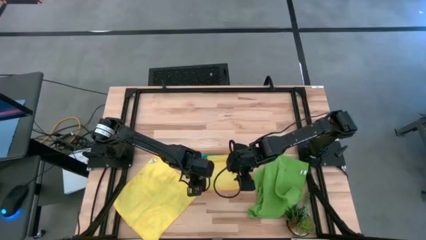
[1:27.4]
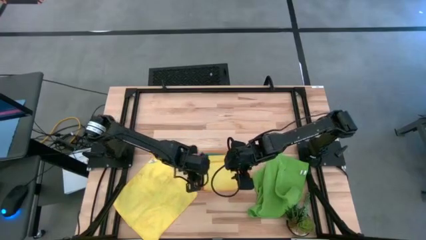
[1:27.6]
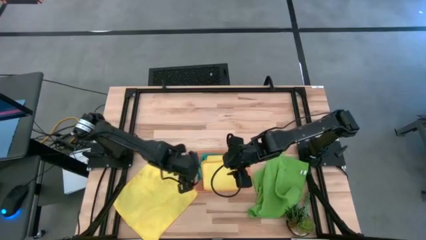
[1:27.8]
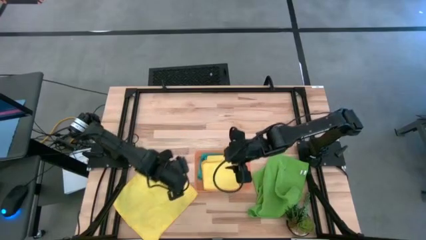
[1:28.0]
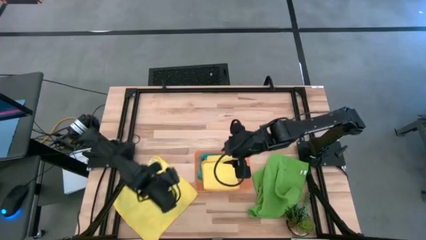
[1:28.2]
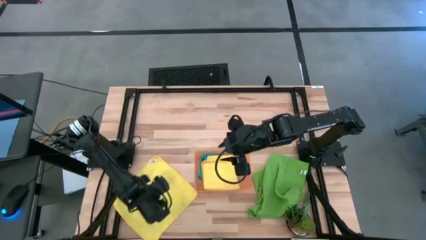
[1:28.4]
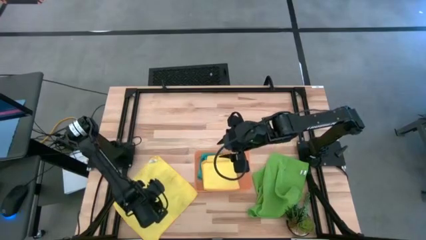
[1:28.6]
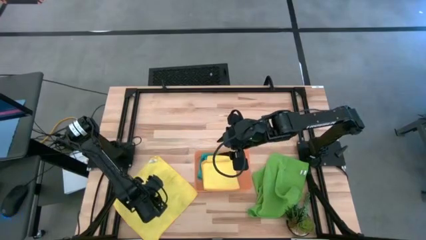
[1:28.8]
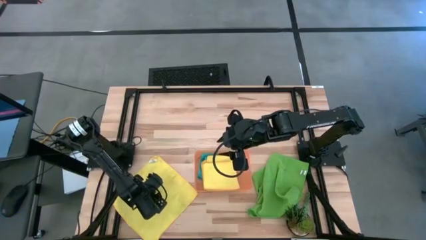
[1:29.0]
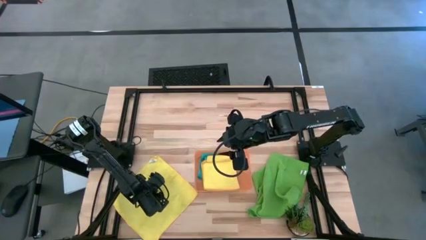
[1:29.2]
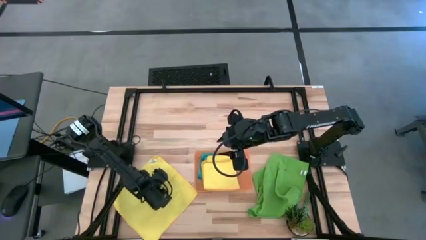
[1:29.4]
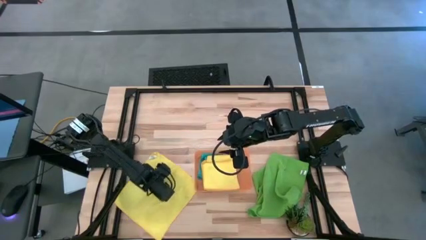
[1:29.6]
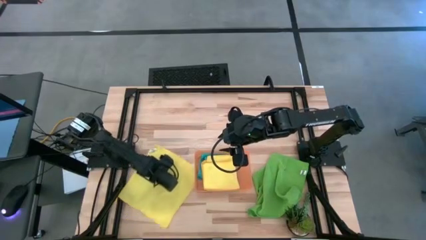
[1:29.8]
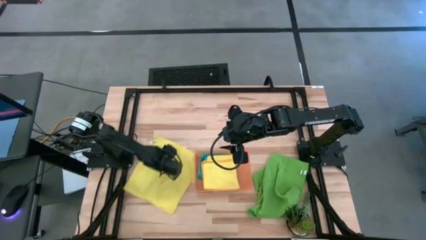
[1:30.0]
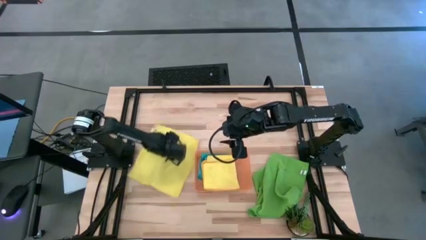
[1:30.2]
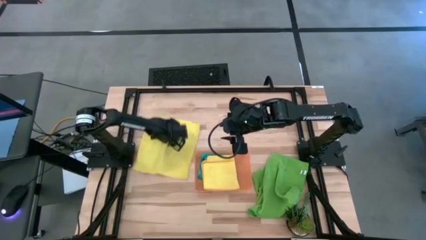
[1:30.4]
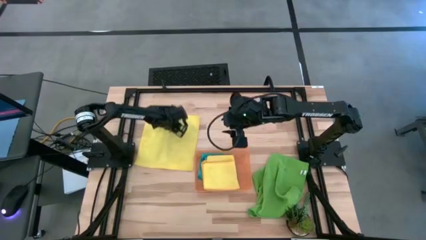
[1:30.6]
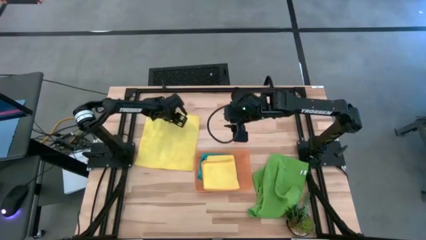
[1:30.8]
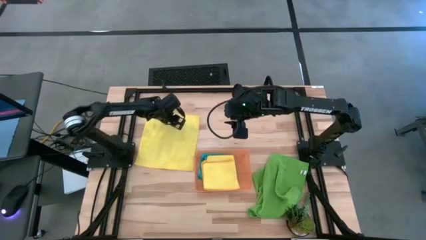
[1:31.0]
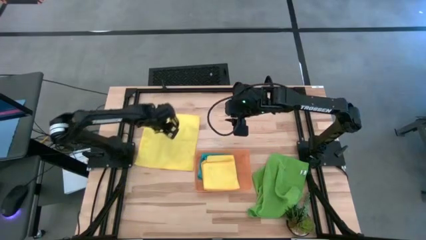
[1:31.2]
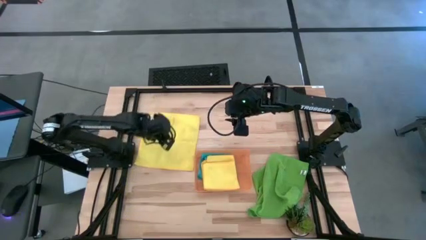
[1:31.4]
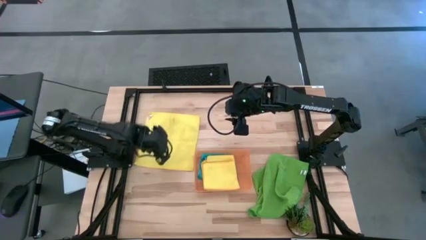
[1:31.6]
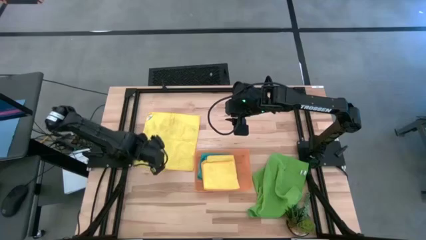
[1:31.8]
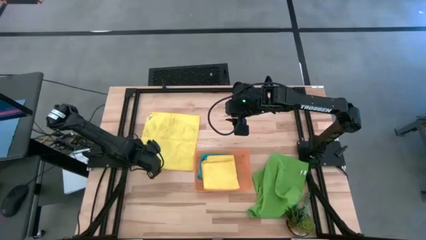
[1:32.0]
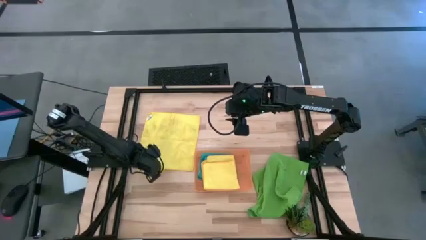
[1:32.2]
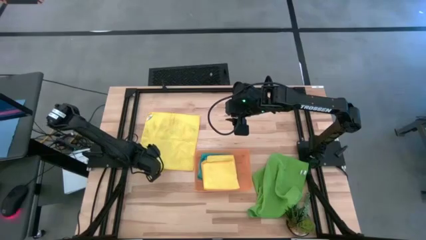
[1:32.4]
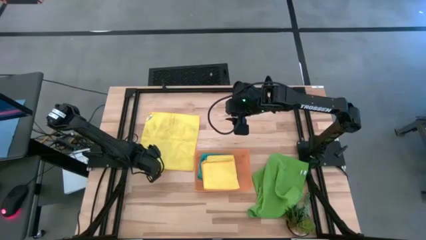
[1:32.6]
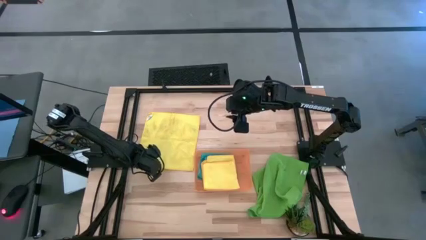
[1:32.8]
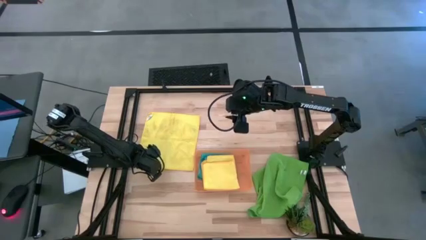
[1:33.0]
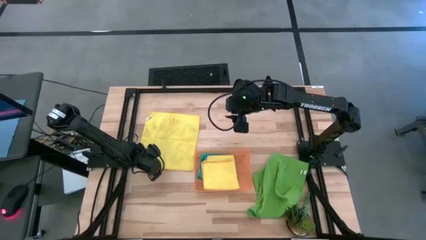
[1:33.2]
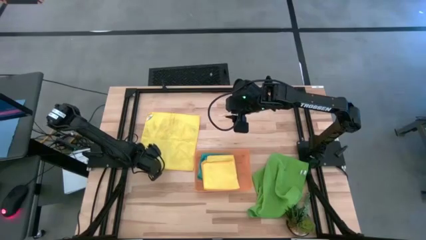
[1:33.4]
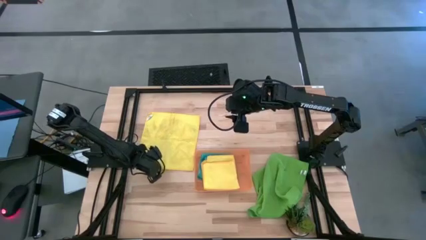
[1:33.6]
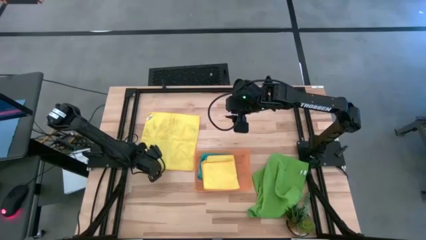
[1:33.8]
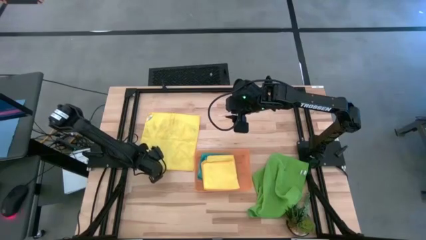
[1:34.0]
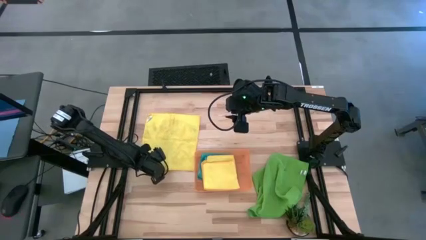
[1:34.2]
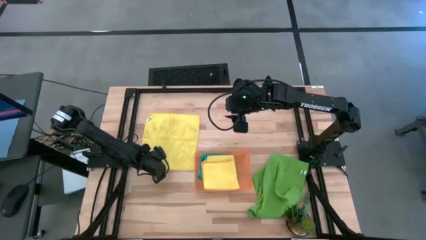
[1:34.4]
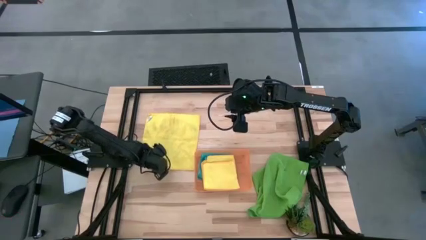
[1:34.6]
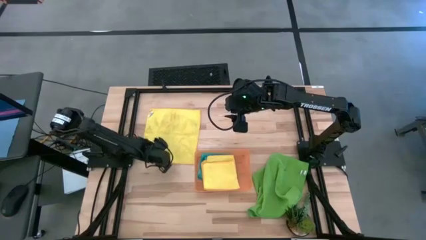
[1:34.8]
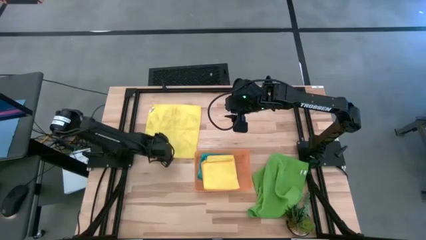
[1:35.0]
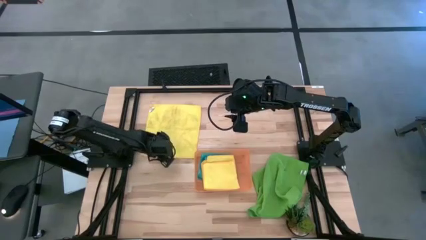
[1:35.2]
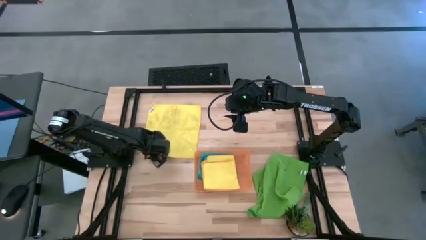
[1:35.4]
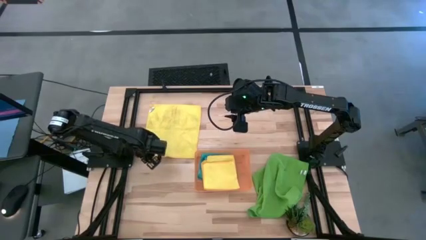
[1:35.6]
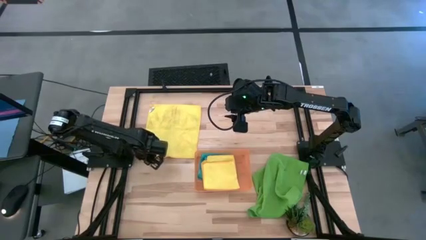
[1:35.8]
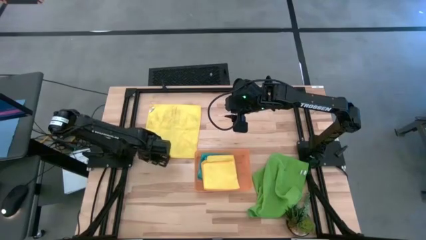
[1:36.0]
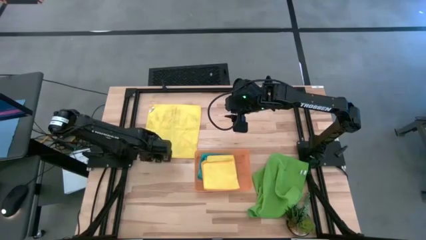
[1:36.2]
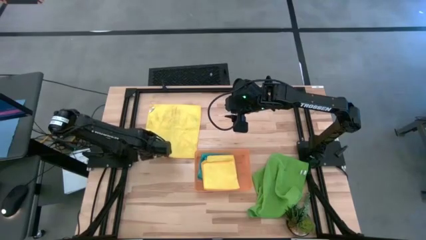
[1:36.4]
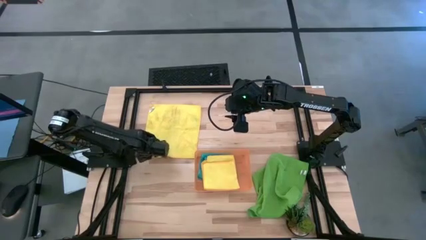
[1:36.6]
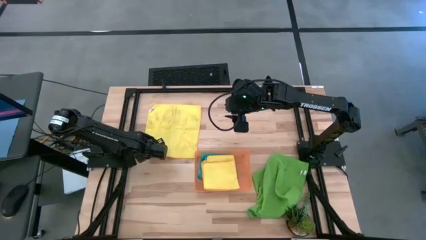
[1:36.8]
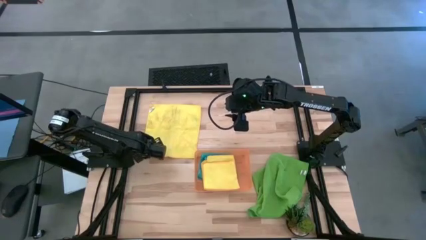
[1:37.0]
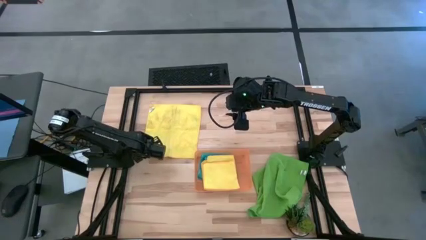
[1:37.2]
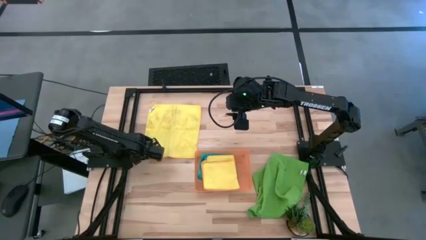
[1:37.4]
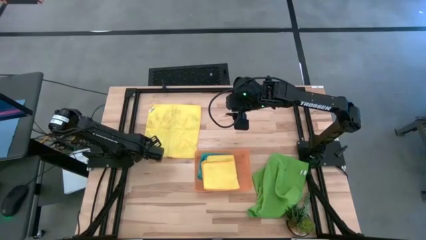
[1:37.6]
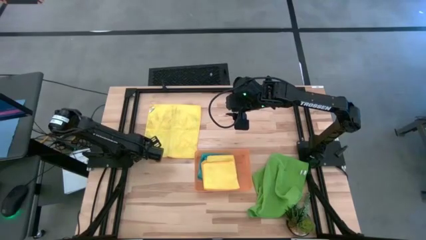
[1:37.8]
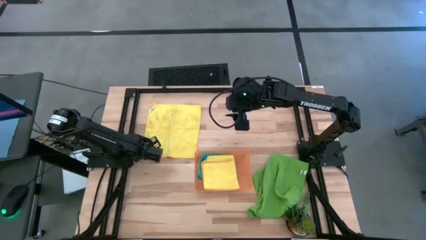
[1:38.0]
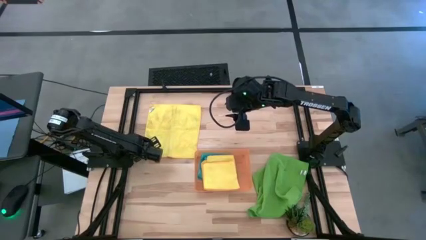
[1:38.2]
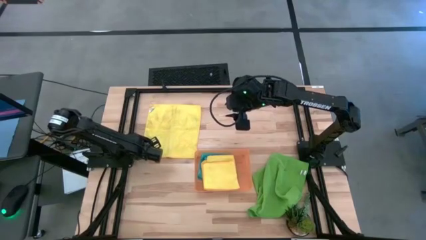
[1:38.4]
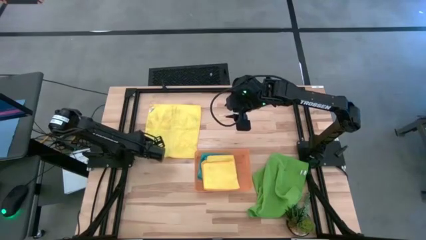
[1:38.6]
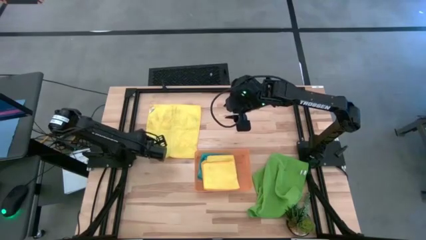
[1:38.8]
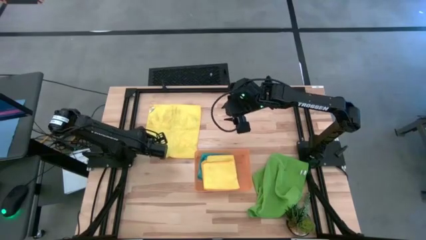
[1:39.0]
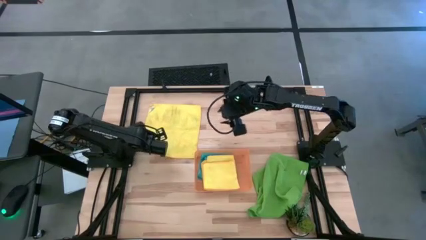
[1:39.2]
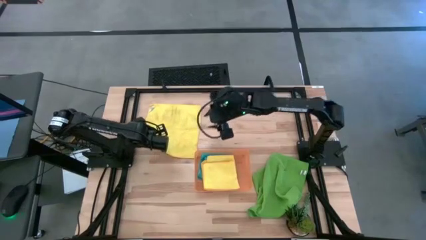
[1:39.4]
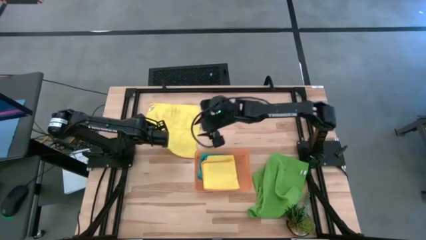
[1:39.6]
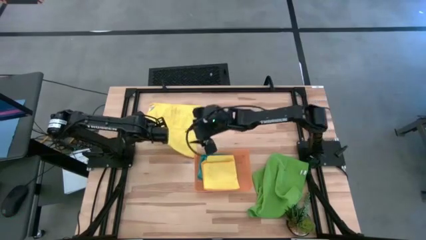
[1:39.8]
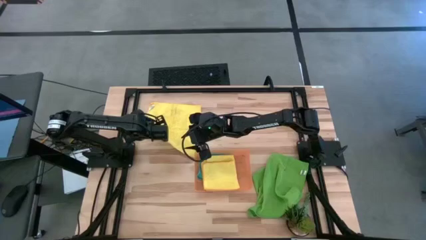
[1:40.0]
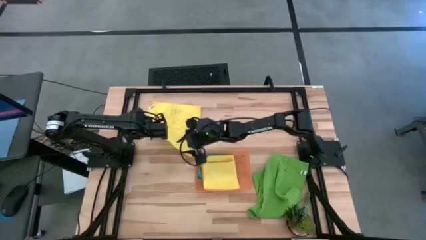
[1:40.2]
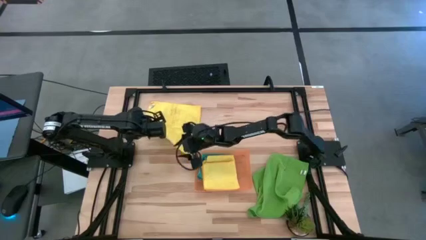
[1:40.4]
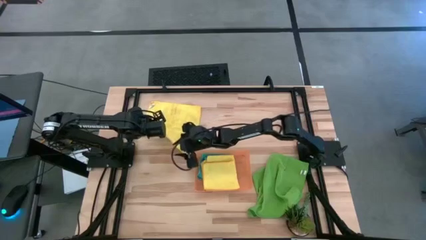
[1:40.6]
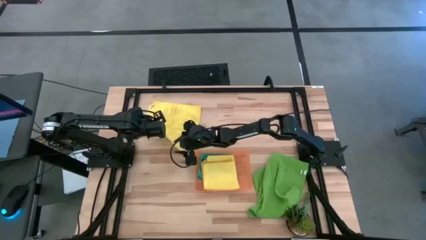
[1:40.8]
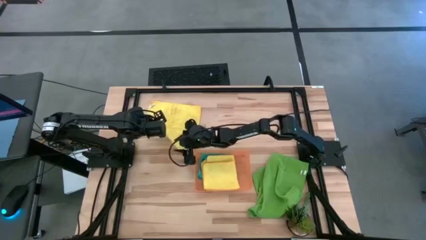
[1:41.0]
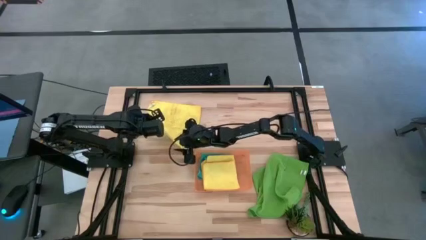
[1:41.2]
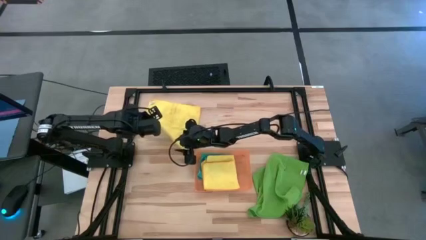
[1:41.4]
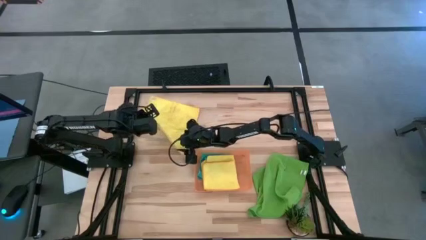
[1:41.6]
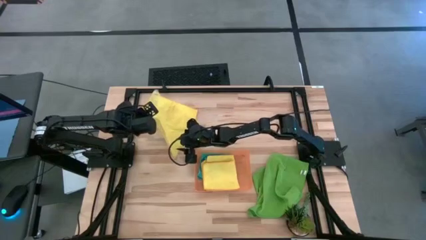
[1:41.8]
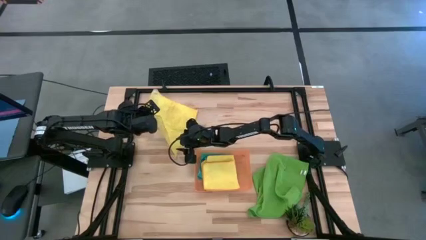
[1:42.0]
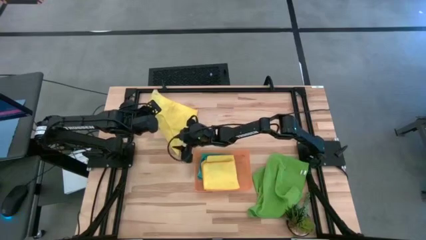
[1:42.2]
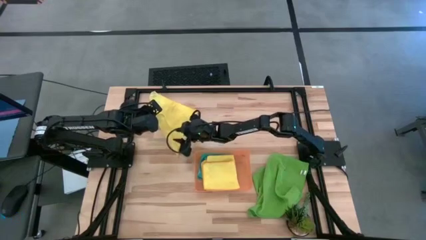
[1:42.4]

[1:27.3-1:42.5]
Task: Fold microfiber towels
Fold the yellow towel
